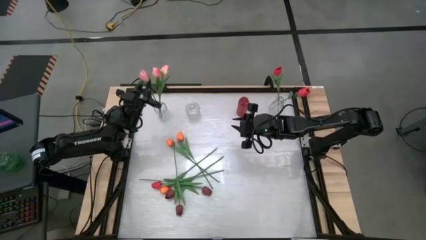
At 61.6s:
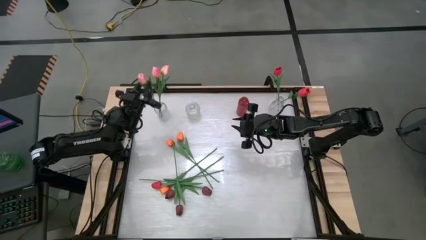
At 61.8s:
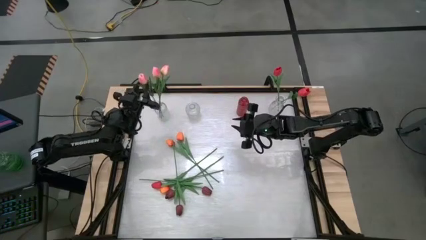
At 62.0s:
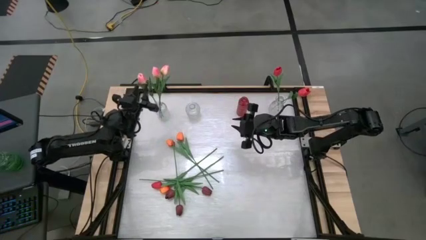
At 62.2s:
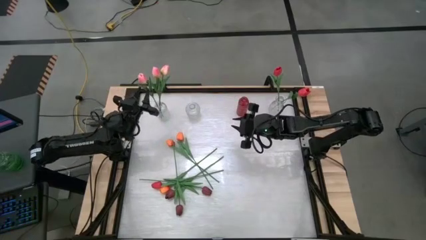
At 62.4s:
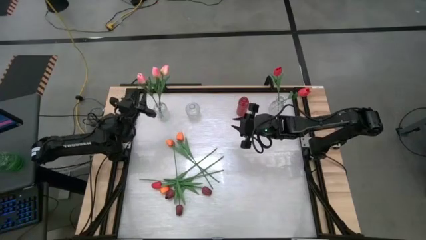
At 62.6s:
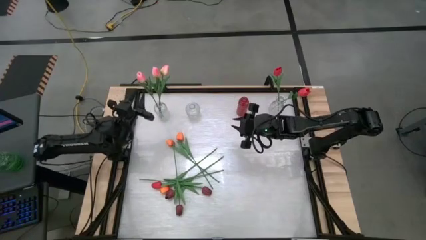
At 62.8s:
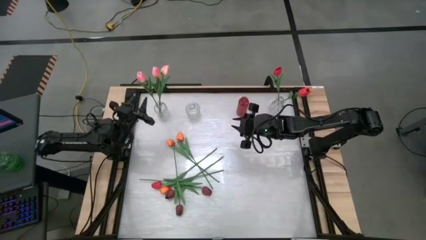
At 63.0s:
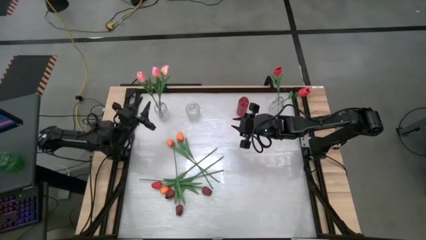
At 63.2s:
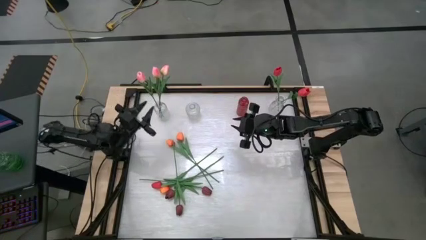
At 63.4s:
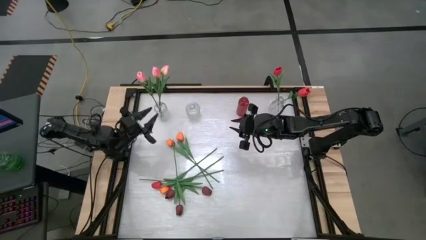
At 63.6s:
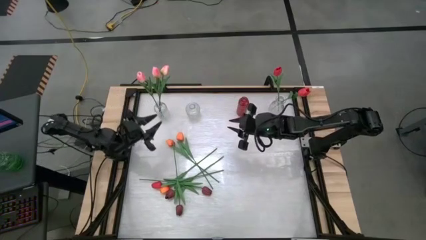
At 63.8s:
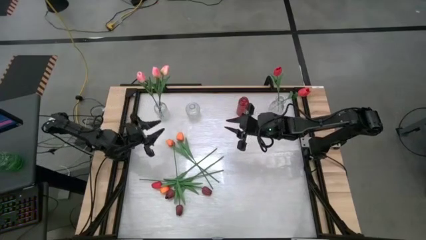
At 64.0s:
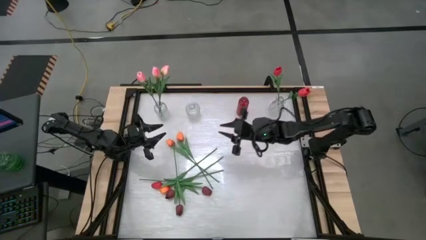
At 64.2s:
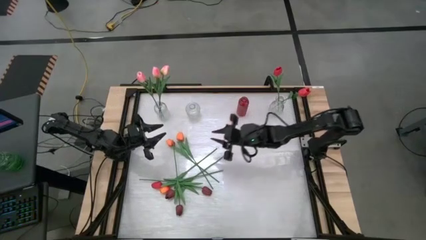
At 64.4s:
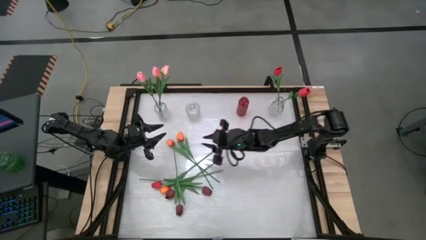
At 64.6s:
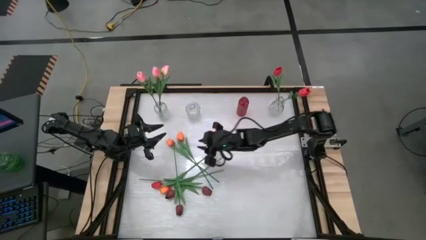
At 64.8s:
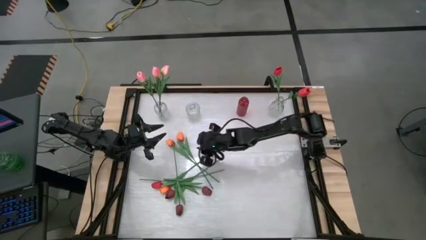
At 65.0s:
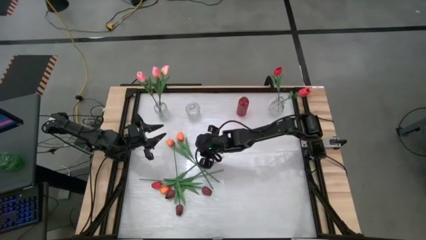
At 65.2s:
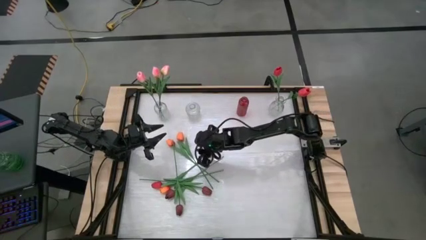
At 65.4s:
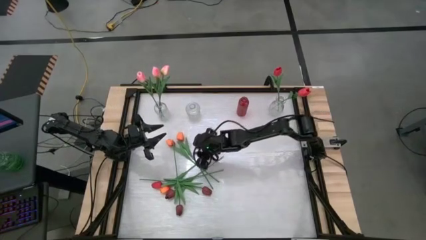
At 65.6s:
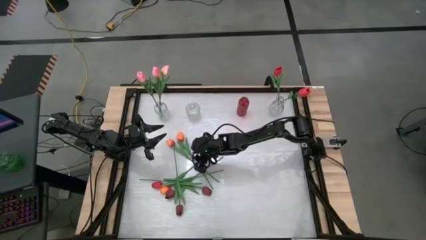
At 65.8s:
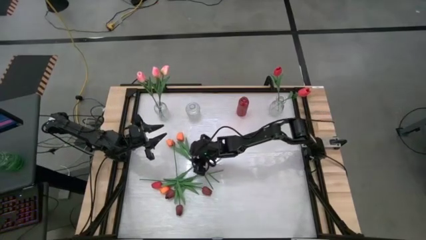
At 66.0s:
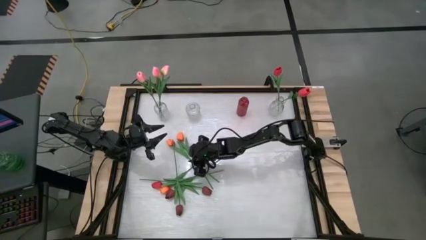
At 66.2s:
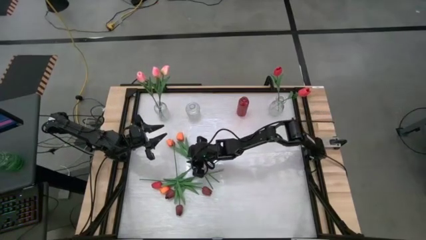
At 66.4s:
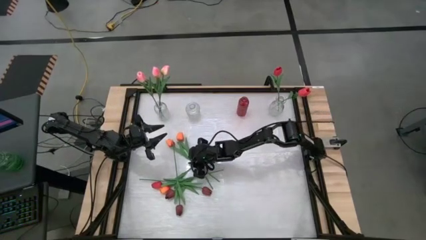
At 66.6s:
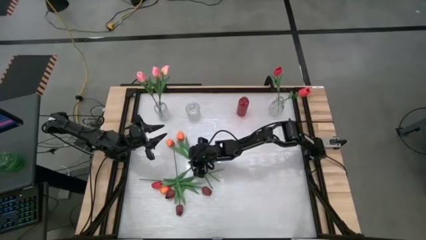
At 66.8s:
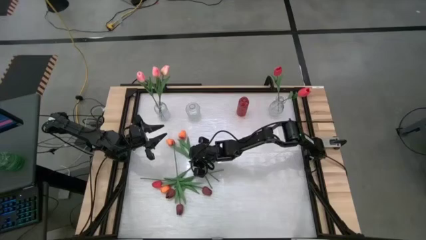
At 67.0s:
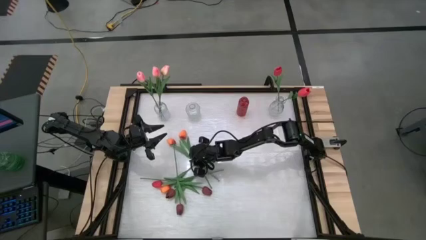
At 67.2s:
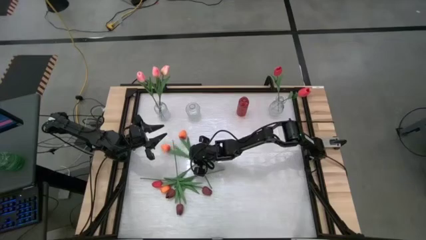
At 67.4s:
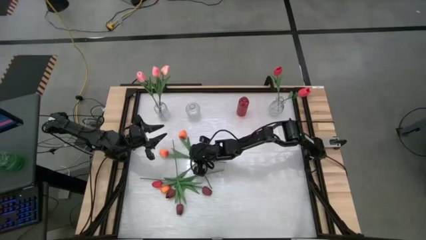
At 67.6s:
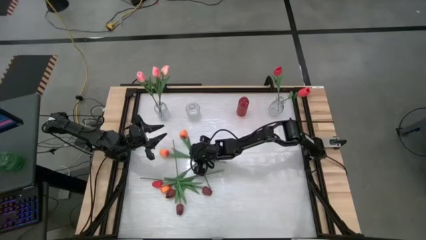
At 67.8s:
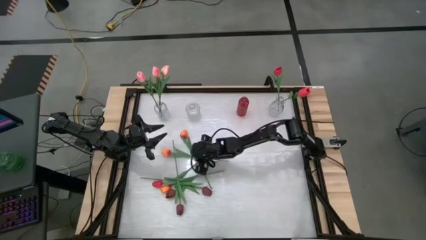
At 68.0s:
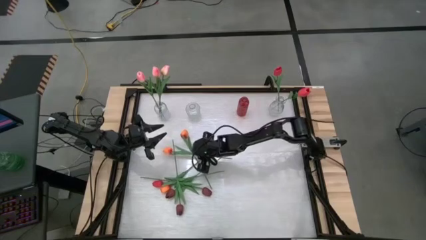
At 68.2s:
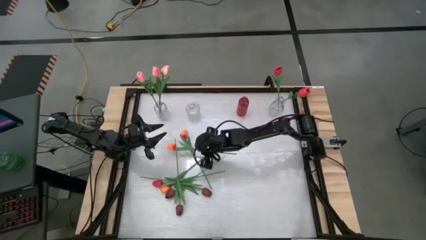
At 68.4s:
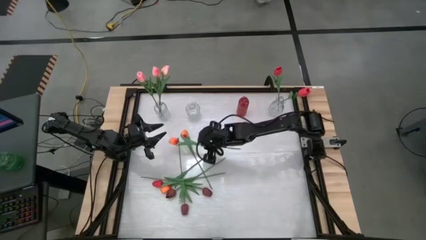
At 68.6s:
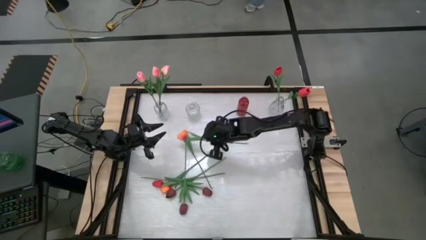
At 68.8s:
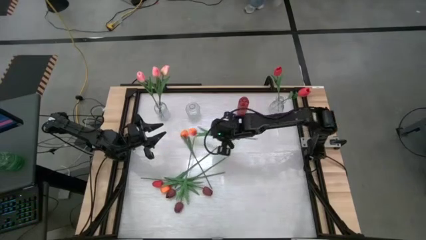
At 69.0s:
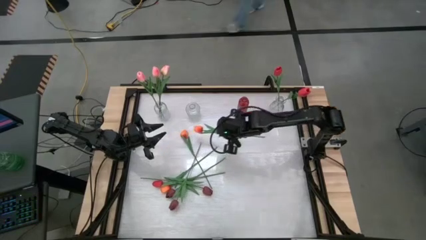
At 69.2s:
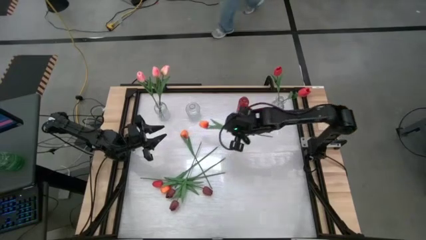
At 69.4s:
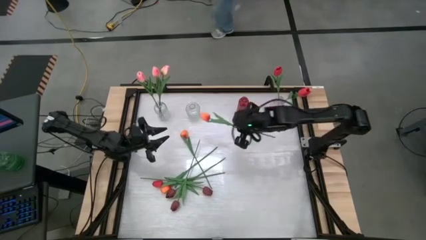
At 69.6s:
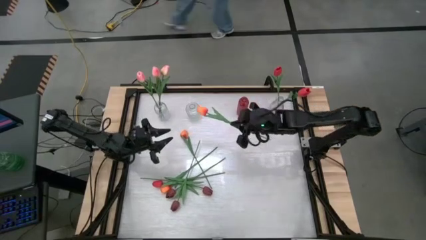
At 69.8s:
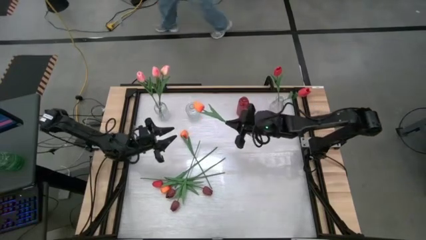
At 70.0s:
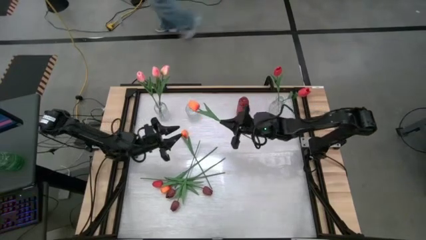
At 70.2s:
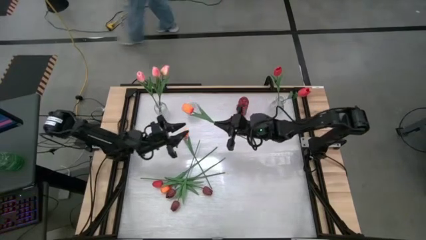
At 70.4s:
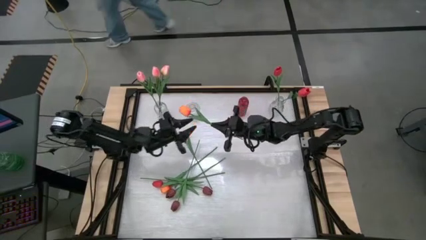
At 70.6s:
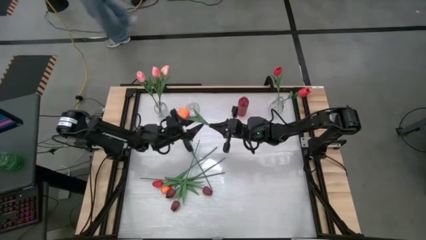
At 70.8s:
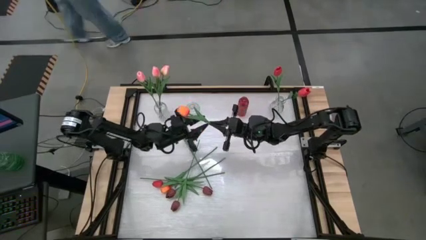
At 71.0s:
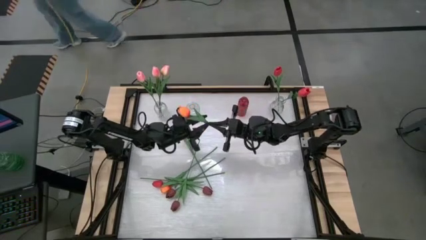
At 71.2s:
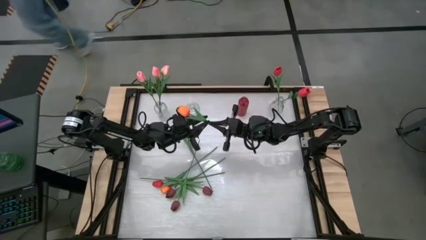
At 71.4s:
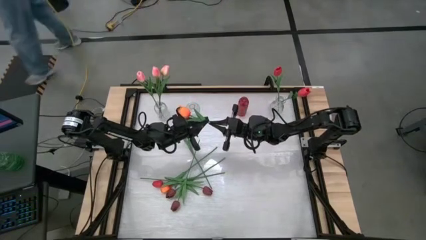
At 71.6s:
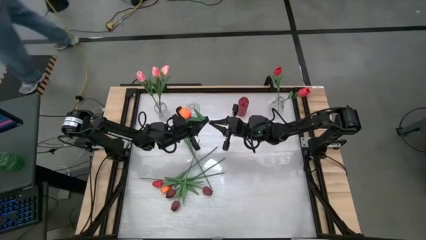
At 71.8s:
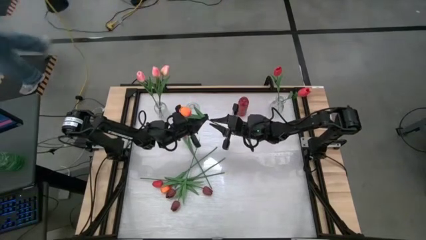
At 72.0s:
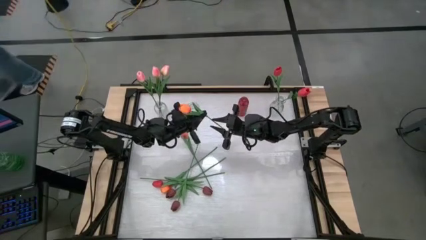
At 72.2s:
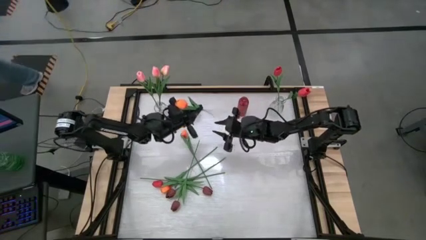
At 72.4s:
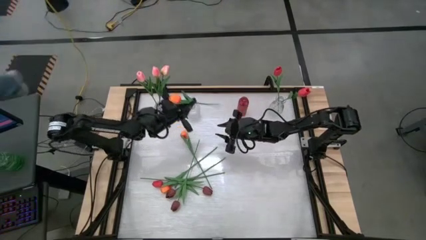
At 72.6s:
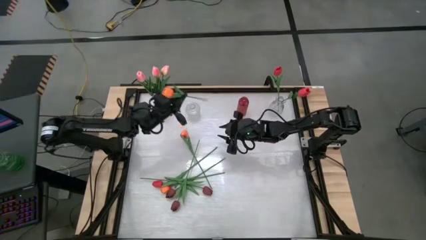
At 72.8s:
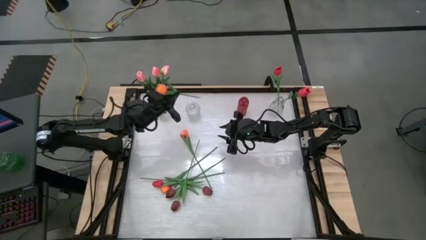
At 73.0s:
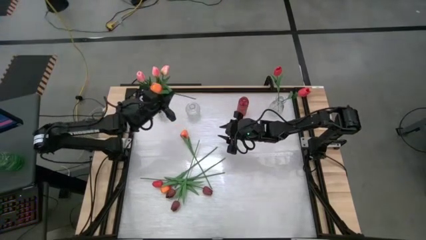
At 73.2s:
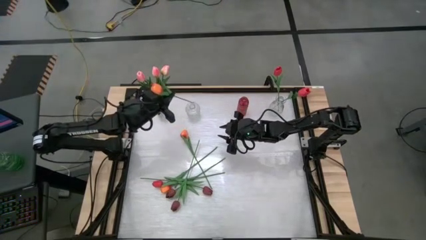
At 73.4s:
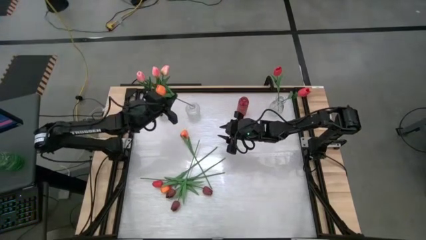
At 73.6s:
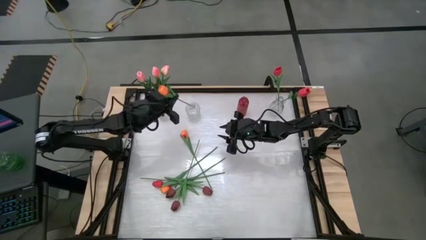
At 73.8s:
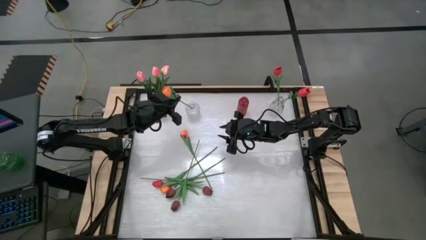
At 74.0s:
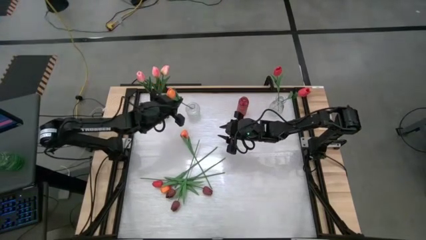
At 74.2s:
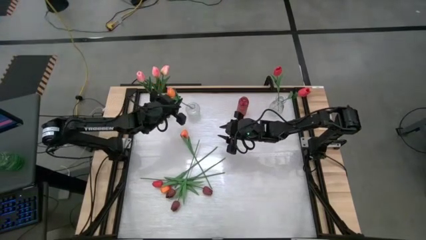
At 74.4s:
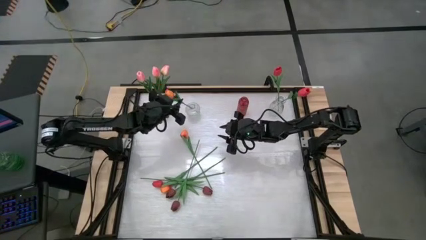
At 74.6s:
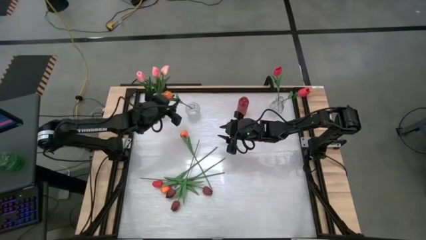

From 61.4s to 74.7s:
Task: Sort flowers into vase by color
Put the orange flower into the middle transparent vase

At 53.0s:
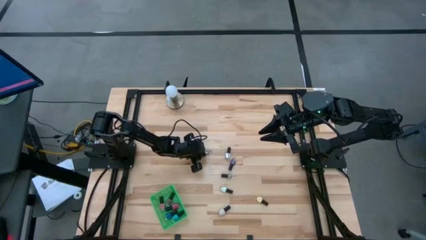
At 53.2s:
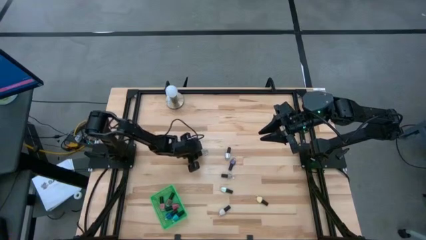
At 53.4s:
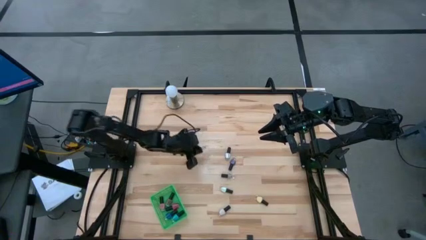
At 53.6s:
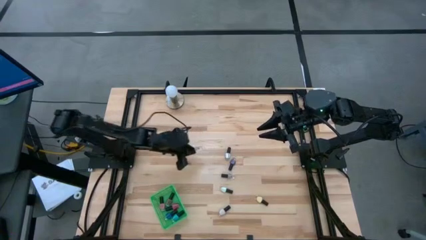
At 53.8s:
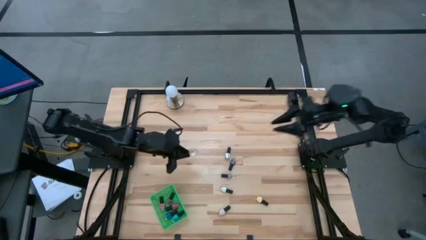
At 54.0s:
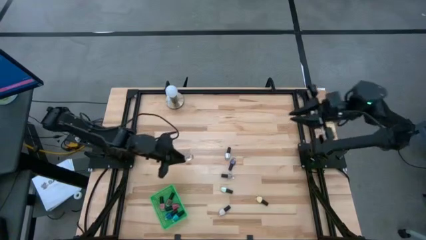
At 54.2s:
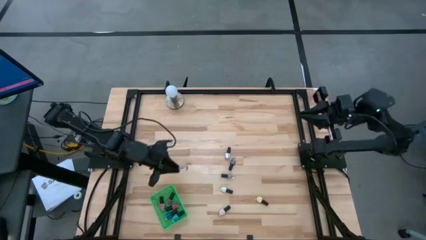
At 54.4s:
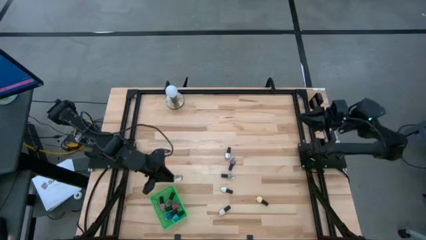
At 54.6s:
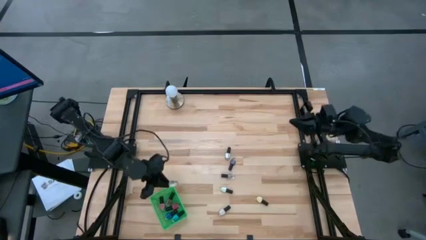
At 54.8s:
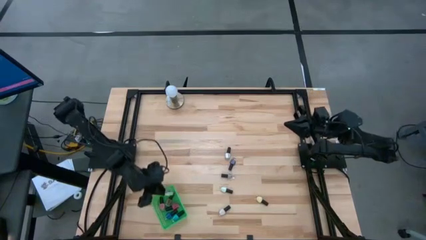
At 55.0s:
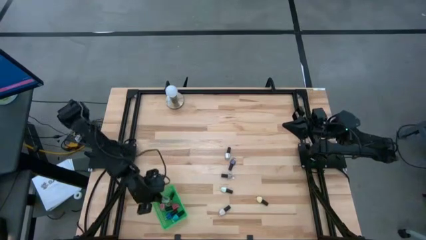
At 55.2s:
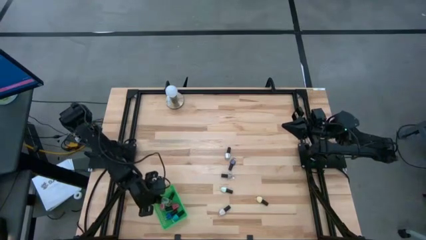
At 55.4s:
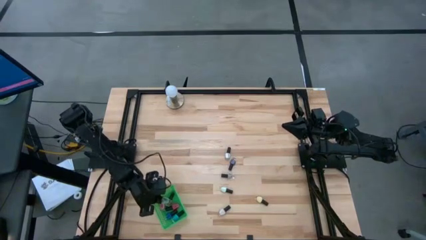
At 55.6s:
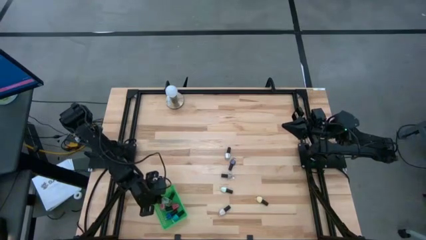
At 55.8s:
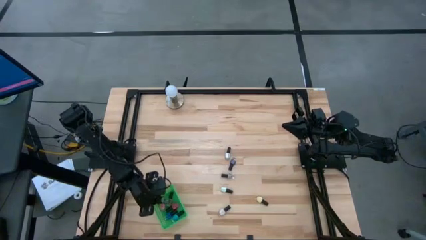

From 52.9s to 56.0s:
Task: Pick & Place Nail Polish
Put the transparent nail polish bottle into the green basket

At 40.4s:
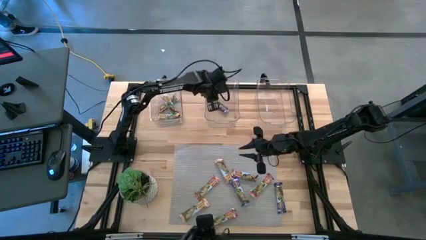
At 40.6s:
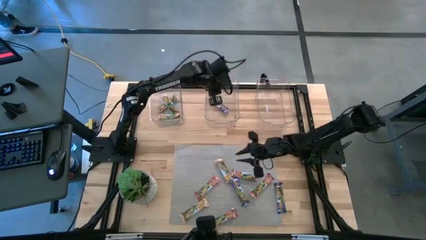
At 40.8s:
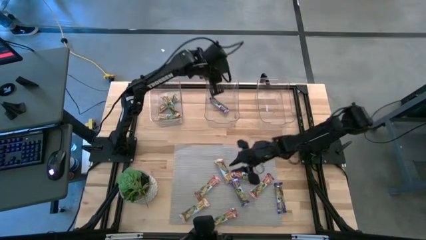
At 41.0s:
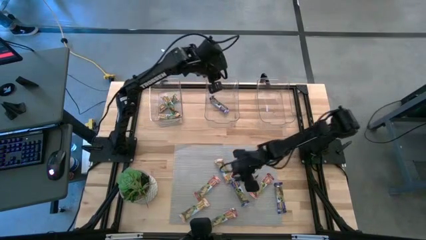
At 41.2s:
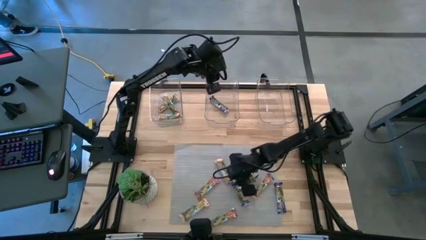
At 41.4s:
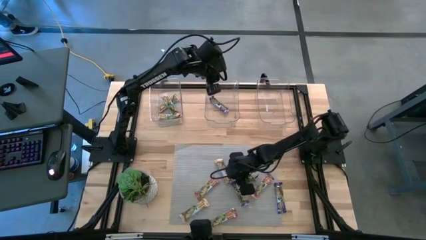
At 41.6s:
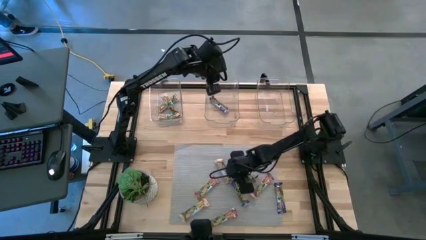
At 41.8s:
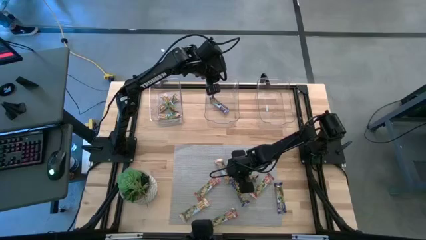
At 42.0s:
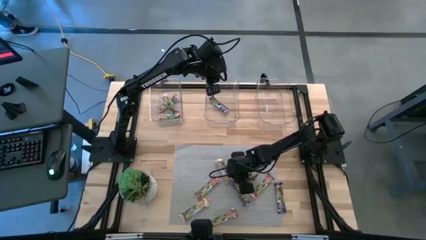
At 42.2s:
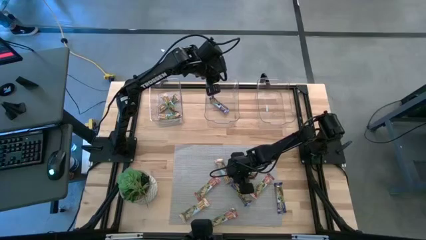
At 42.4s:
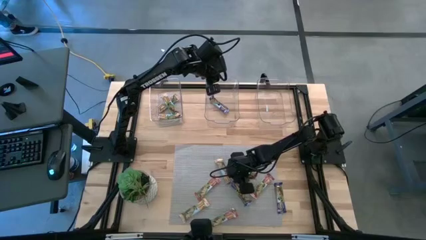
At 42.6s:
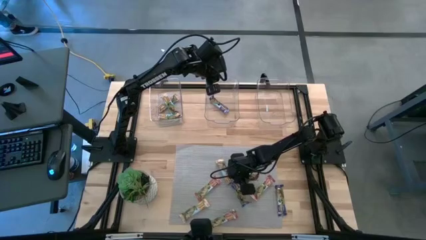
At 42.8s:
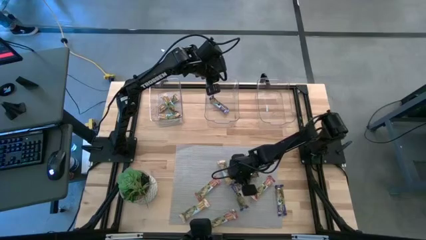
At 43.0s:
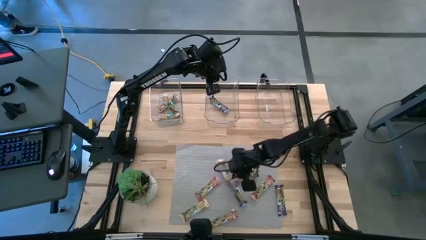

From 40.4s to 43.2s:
Task: Pick and place Granola Bars by type
Put the left blue granola bar into the middle transparent bin
